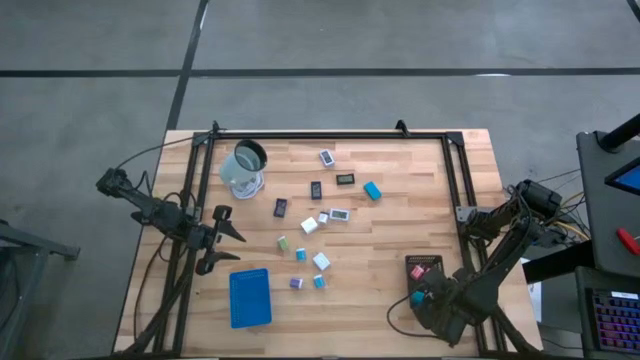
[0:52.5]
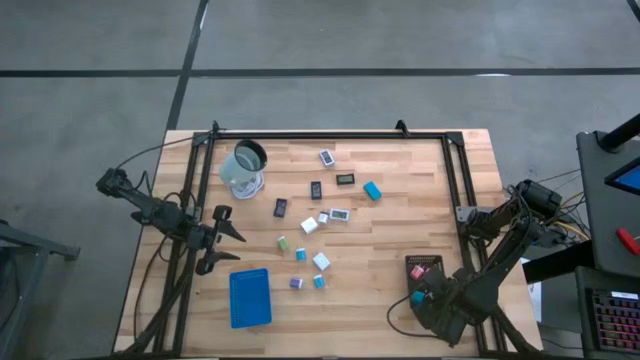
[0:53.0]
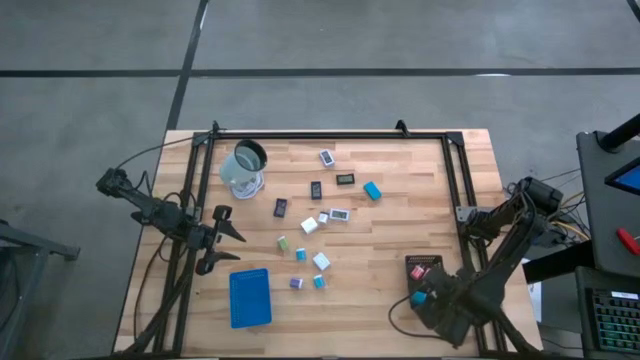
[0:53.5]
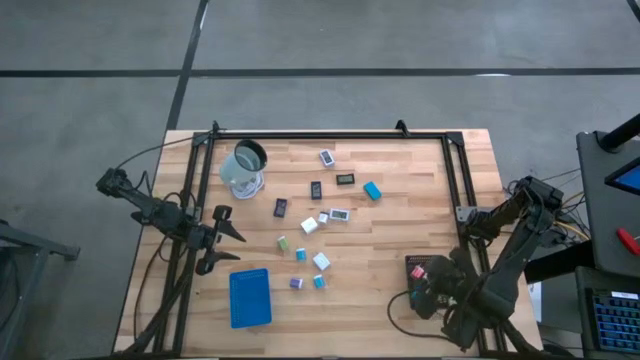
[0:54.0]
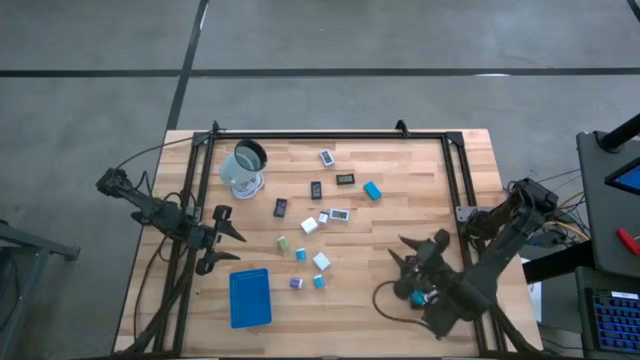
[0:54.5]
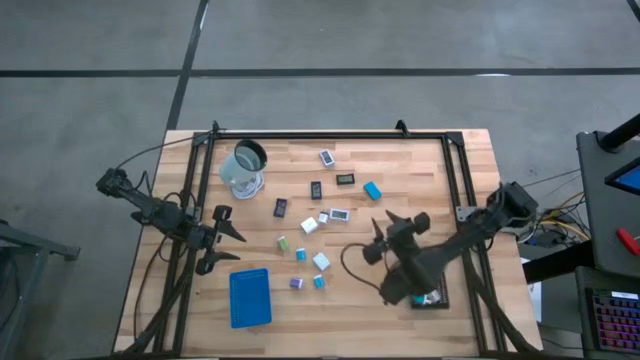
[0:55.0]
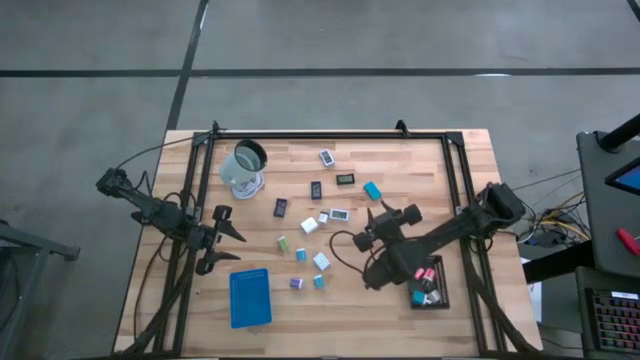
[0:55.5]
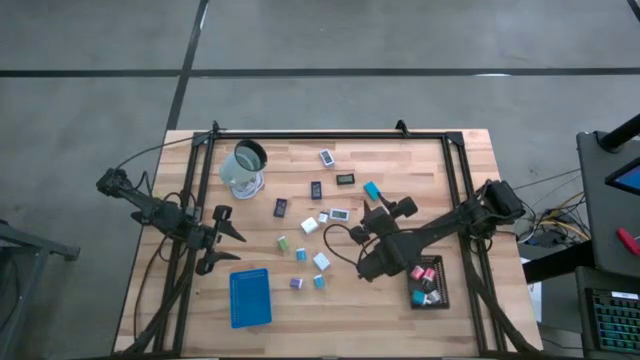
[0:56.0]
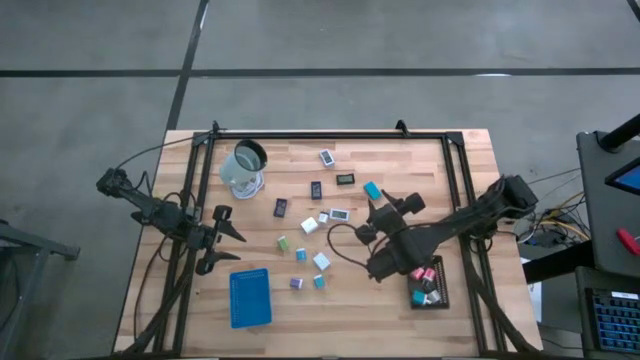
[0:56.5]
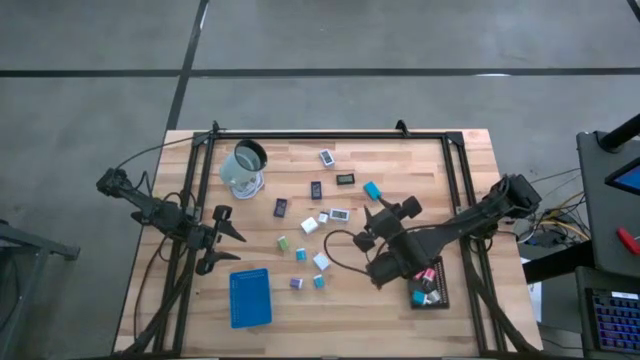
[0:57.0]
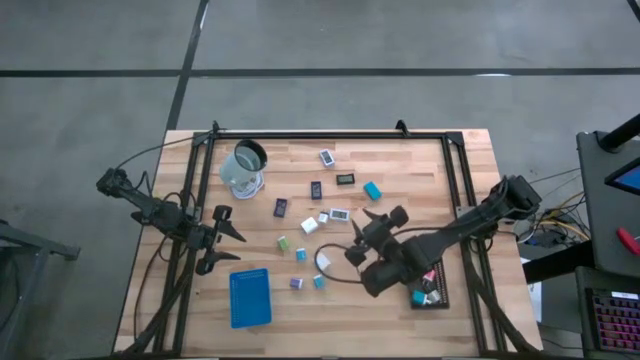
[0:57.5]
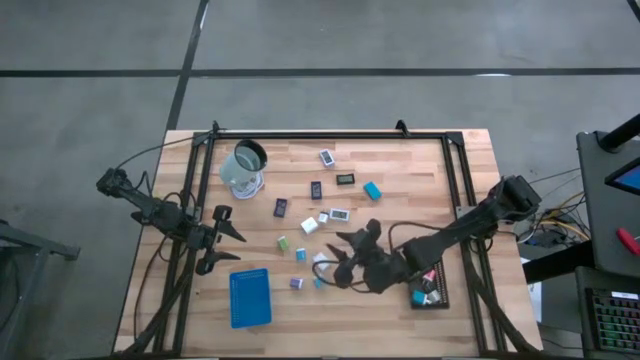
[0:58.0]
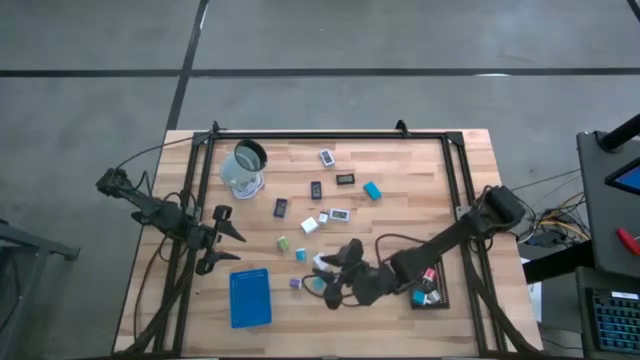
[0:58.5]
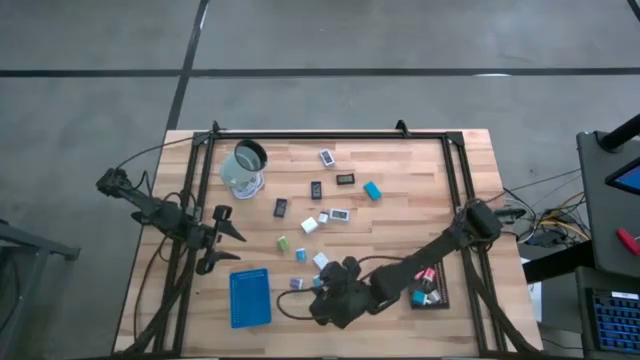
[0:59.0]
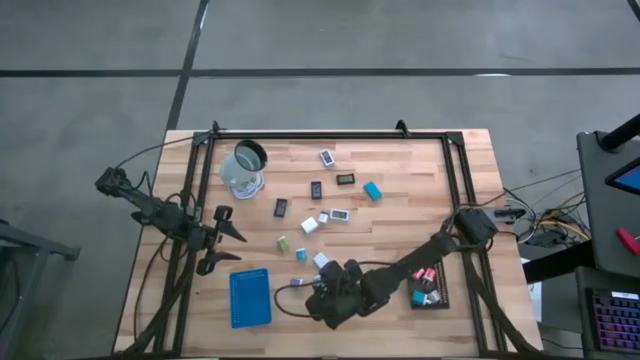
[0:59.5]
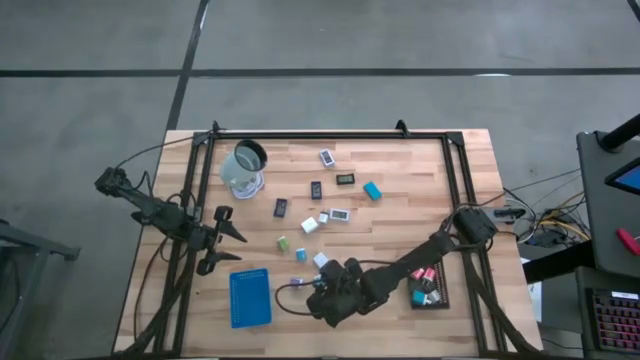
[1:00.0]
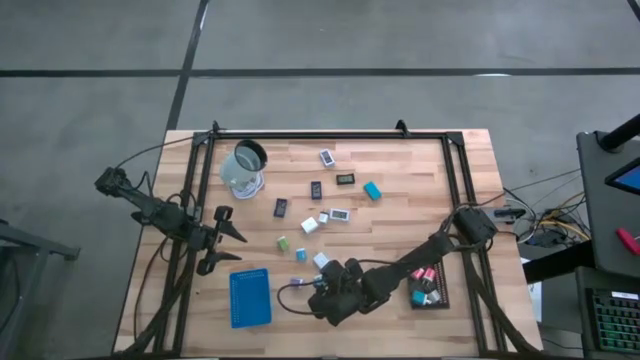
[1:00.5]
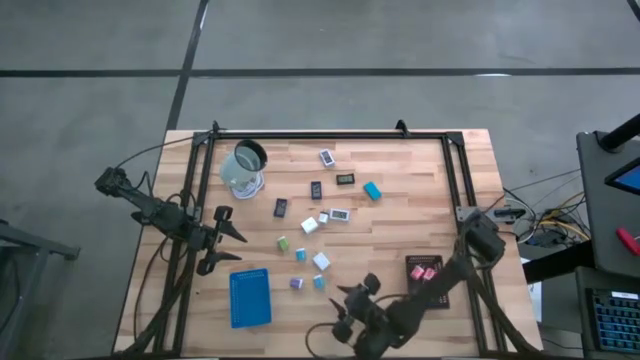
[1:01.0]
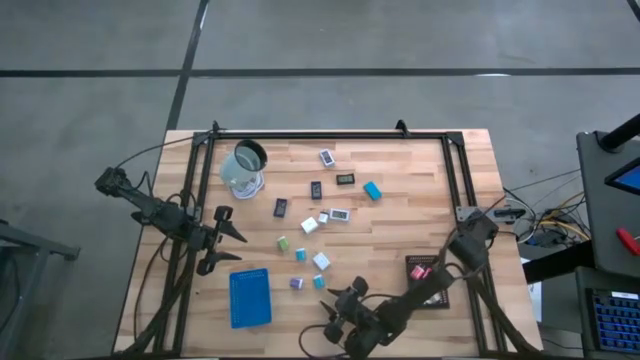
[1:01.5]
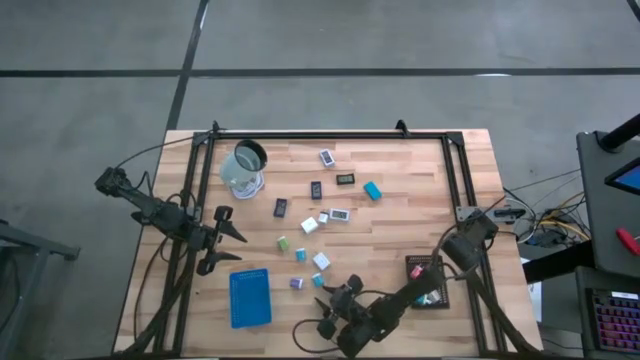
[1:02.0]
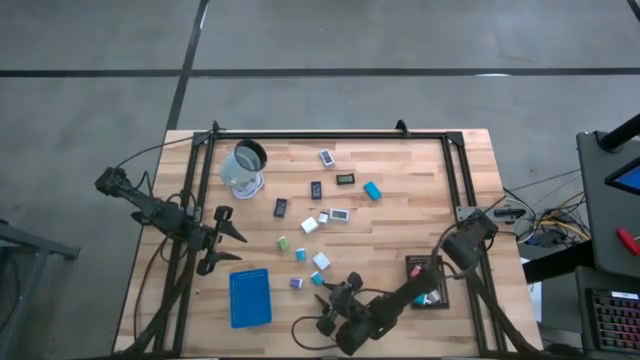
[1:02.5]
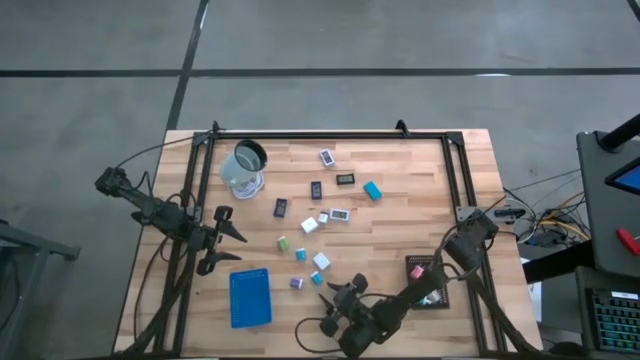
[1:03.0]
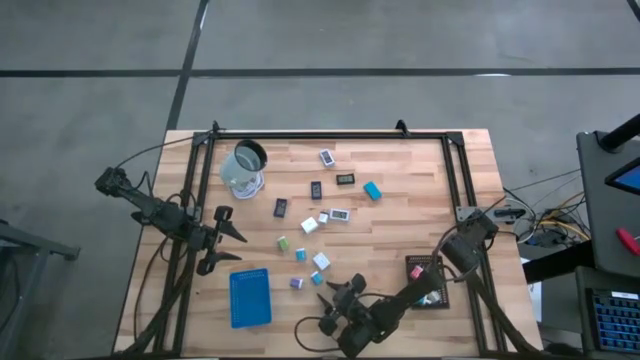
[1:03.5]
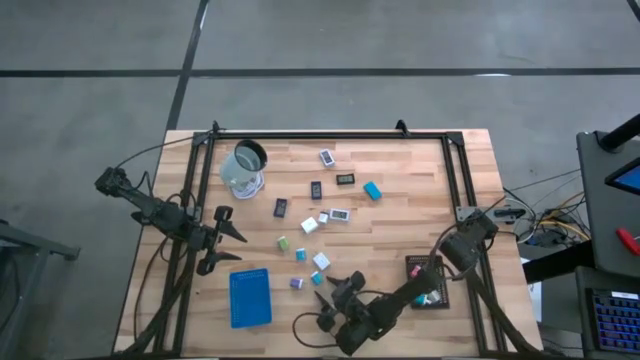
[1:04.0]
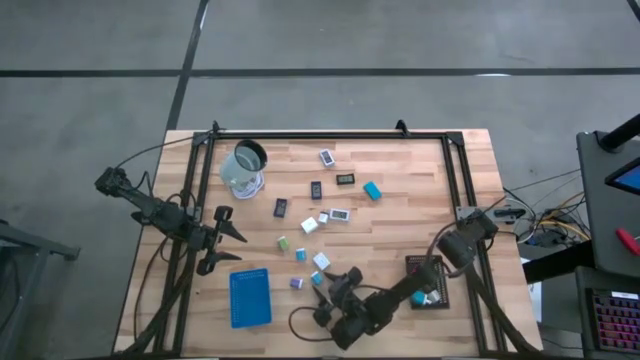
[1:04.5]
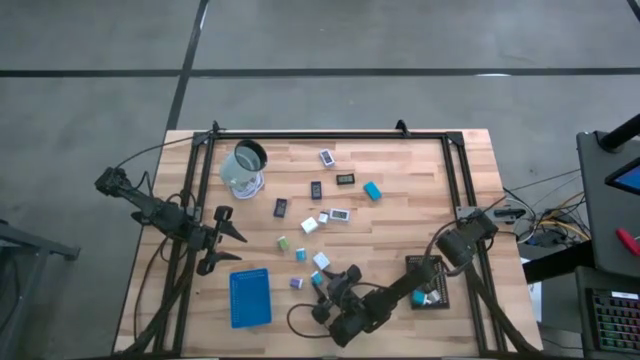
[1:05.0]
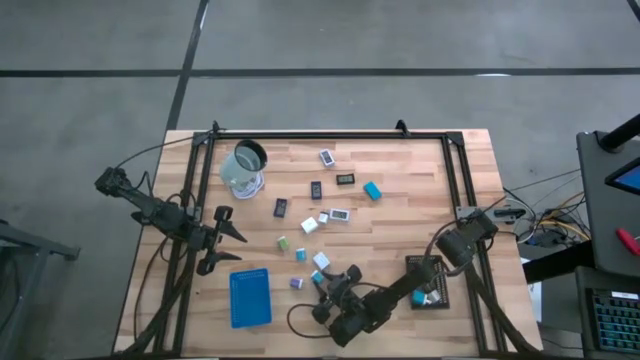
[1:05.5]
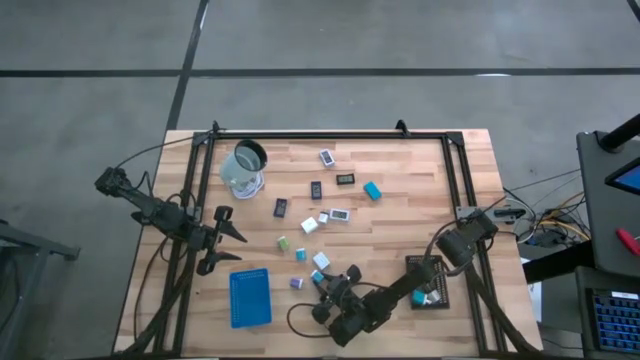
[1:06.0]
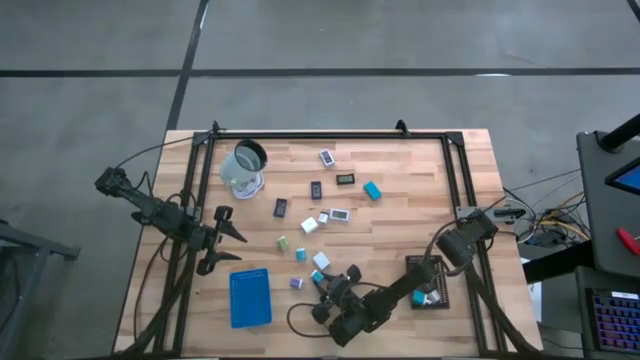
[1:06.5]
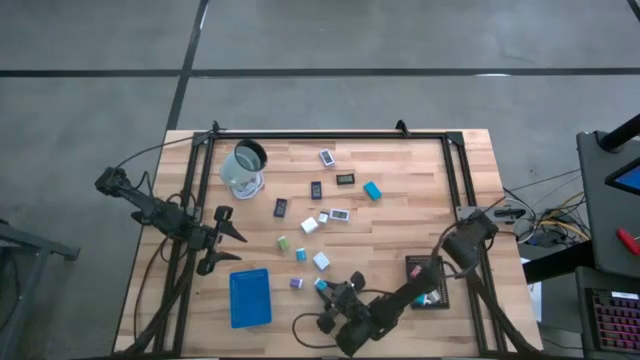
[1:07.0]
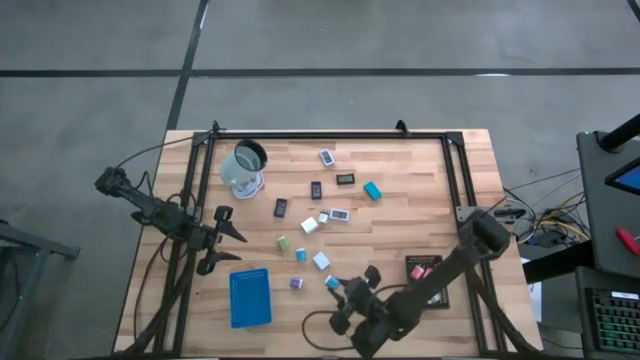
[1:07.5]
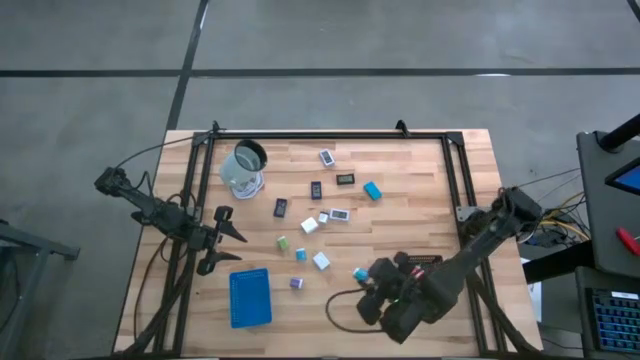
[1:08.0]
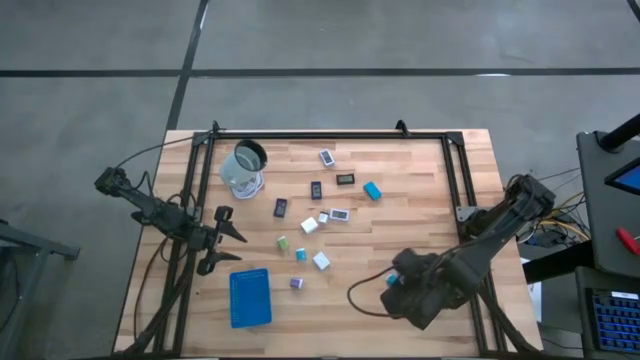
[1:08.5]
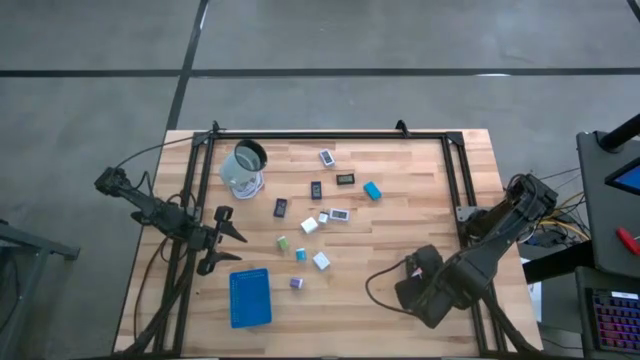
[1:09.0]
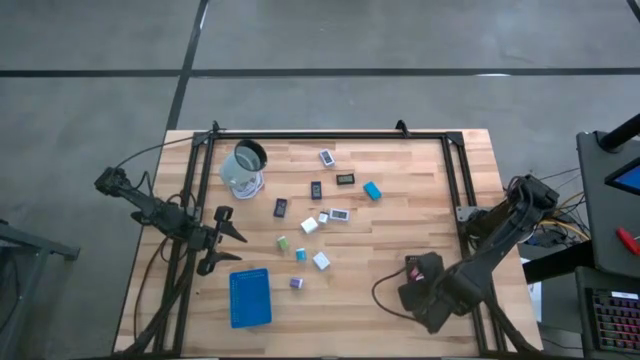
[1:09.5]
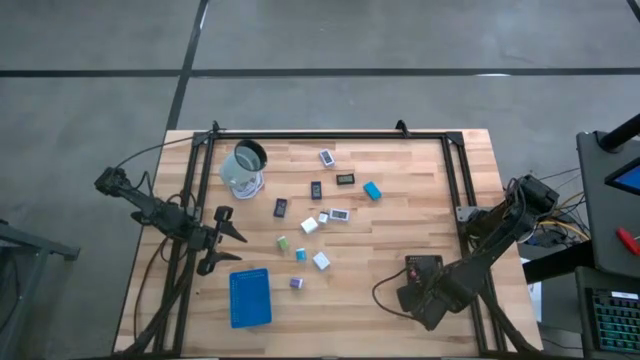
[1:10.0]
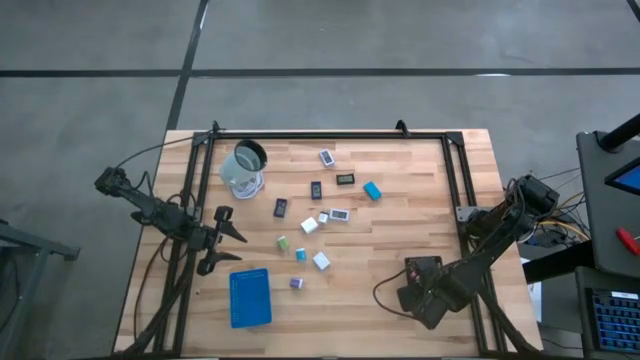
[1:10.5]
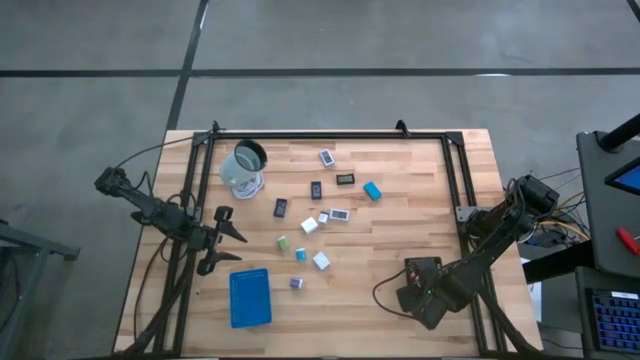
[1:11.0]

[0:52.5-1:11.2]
Task: Pick & Place Office items
Put the bottom light blue charger adapter into the black bin

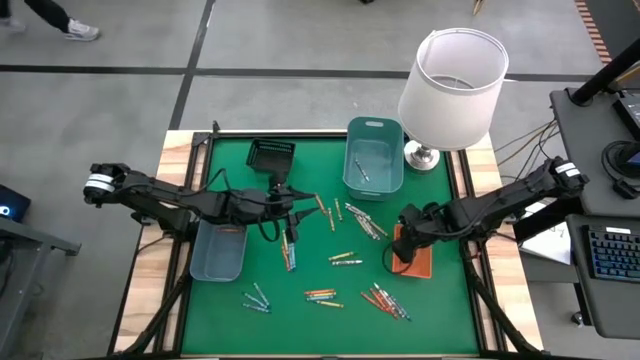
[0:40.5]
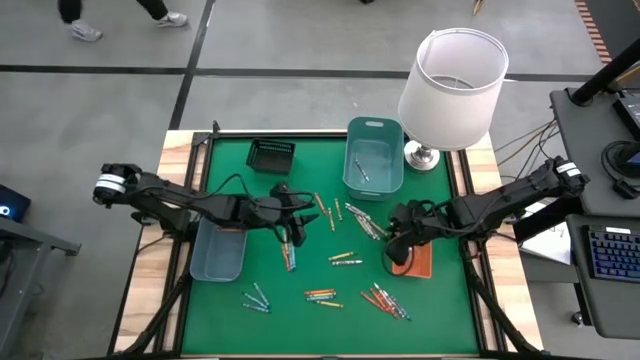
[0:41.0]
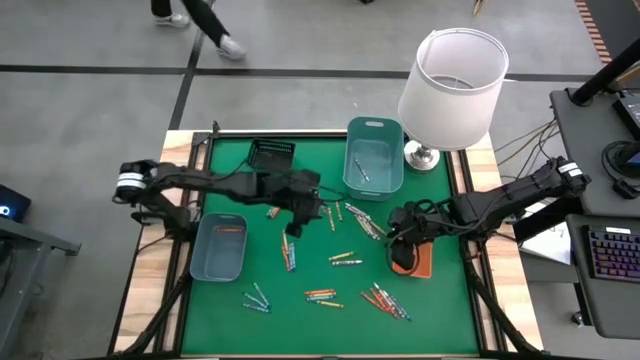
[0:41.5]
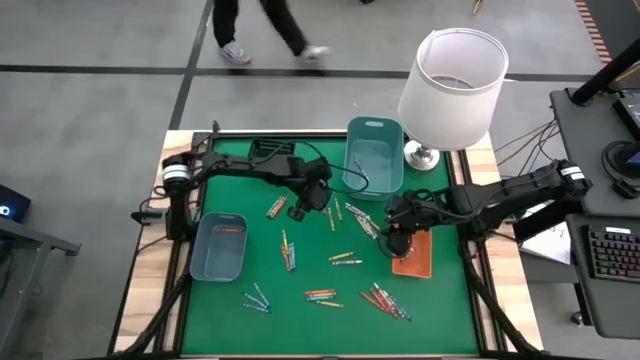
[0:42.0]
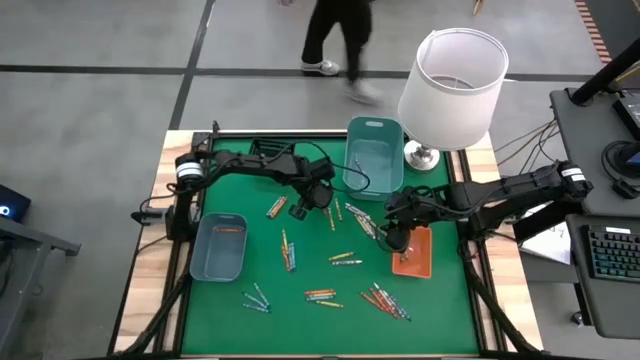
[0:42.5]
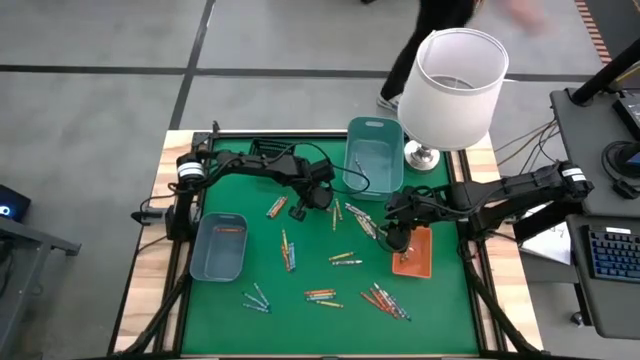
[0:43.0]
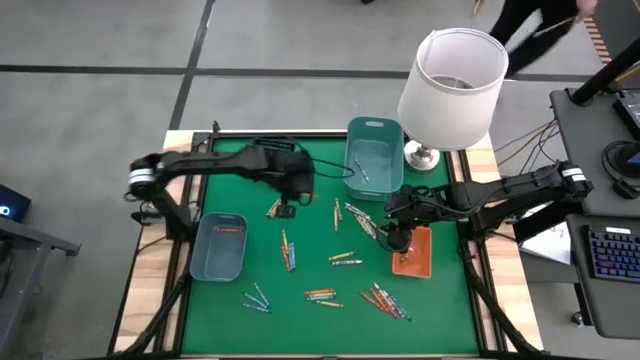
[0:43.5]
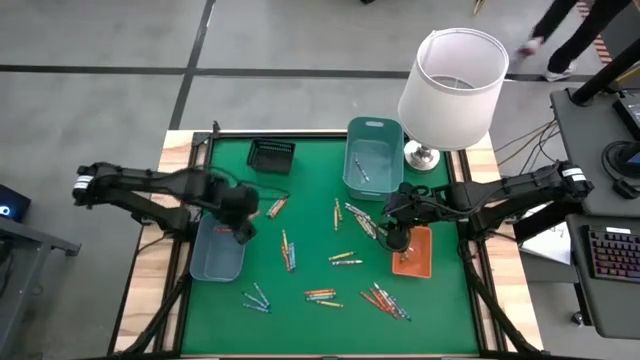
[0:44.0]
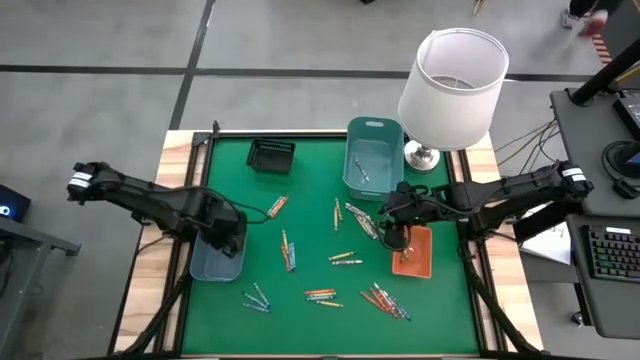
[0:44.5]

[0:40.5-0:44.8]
Task: Sort crayons
Put the orange crayon into the blue bin
